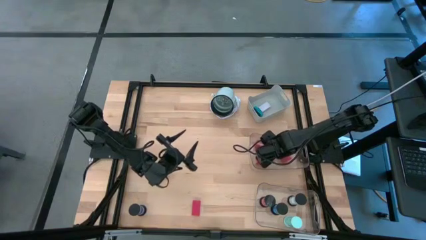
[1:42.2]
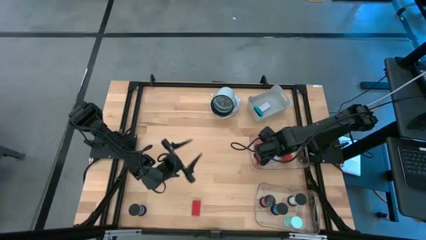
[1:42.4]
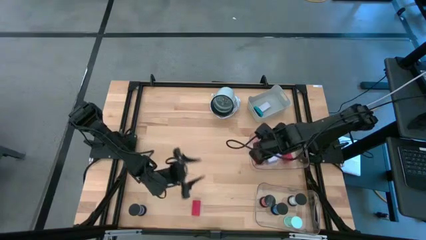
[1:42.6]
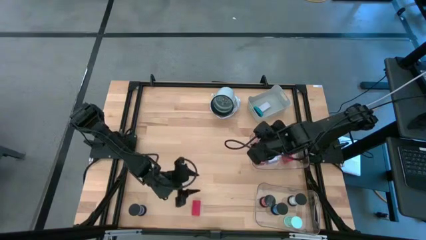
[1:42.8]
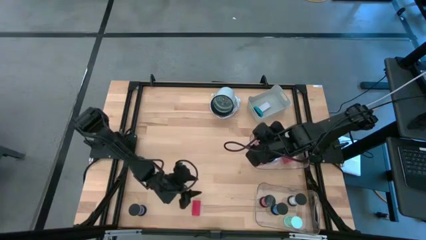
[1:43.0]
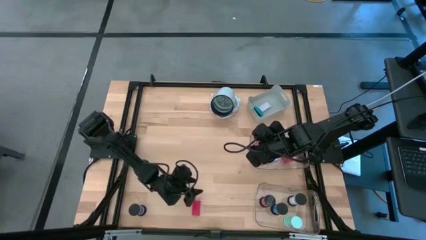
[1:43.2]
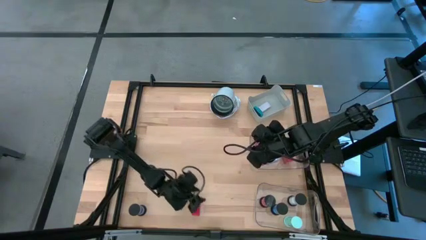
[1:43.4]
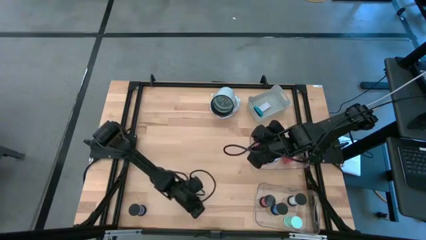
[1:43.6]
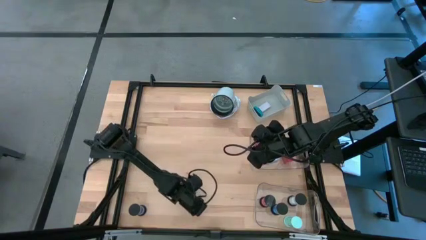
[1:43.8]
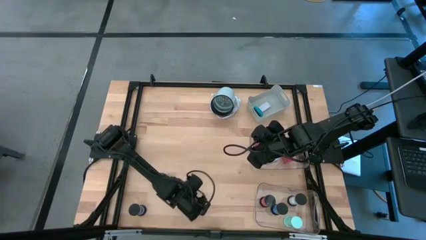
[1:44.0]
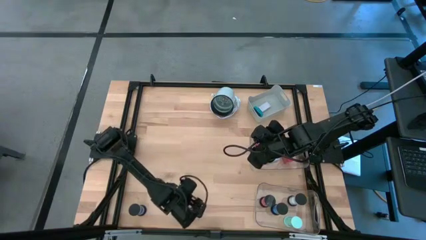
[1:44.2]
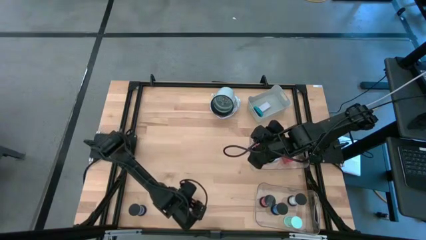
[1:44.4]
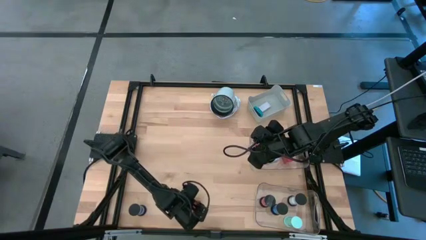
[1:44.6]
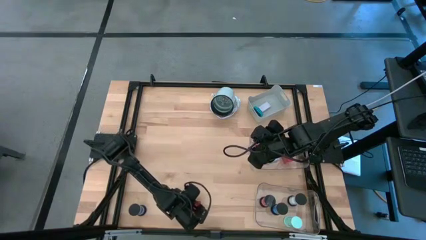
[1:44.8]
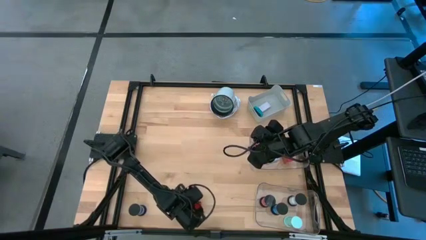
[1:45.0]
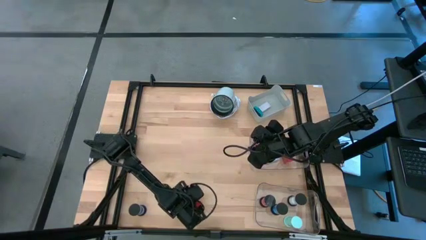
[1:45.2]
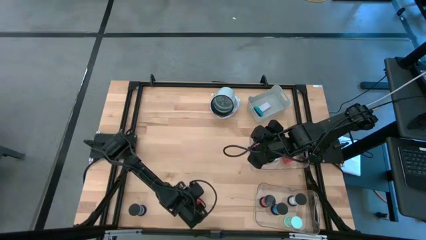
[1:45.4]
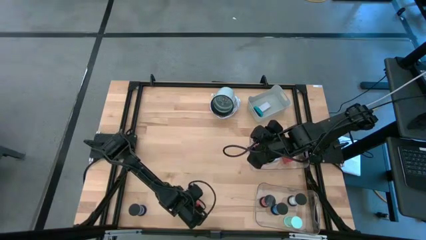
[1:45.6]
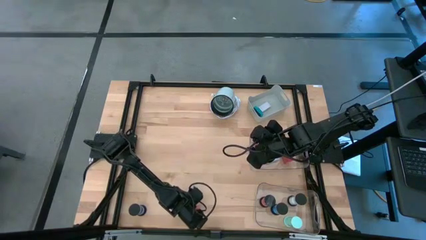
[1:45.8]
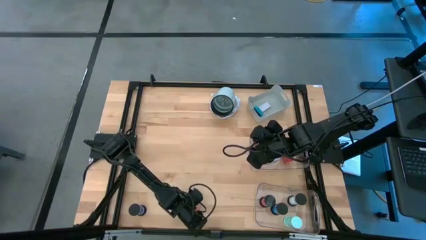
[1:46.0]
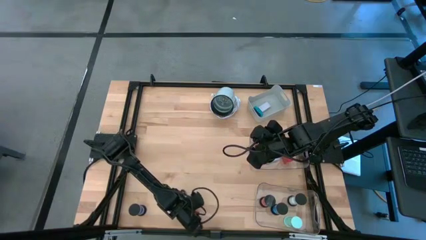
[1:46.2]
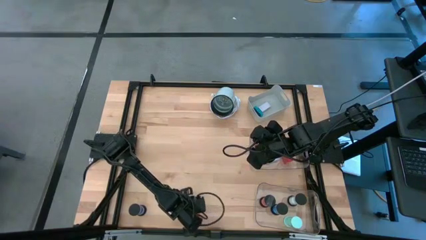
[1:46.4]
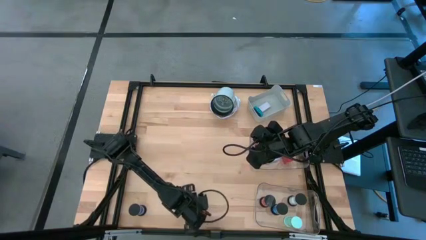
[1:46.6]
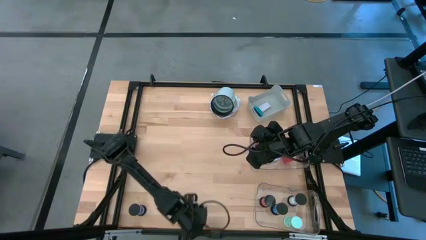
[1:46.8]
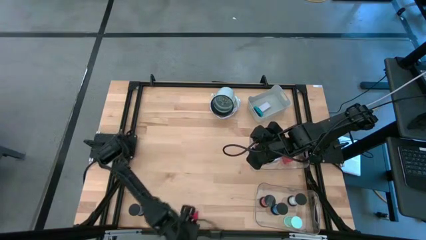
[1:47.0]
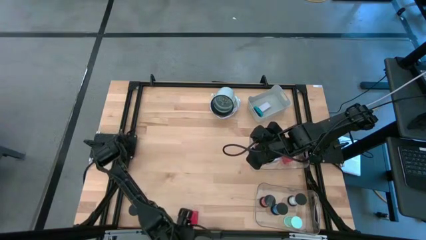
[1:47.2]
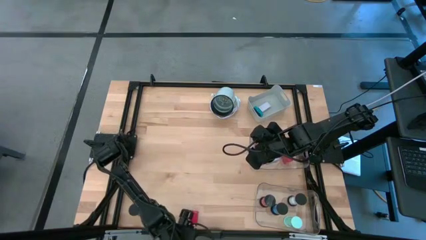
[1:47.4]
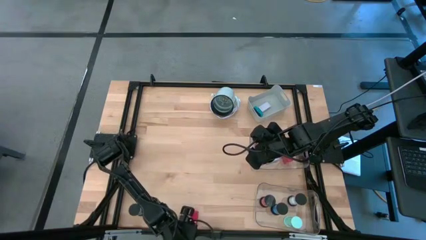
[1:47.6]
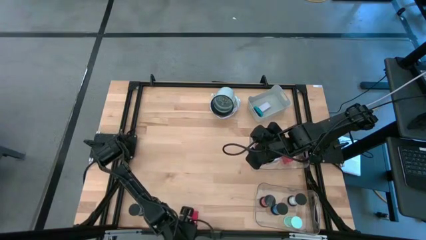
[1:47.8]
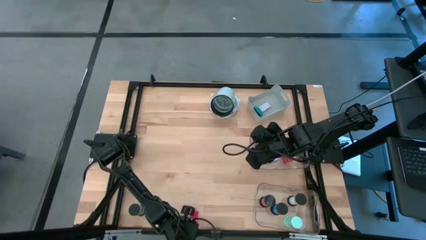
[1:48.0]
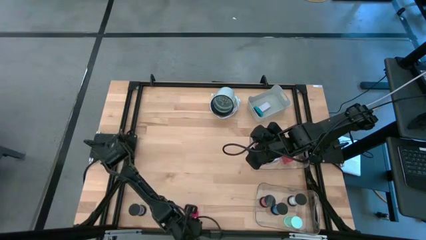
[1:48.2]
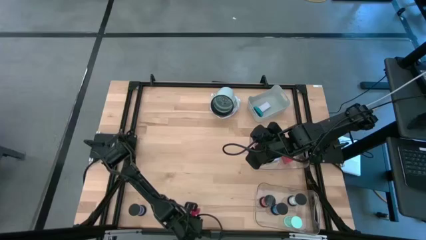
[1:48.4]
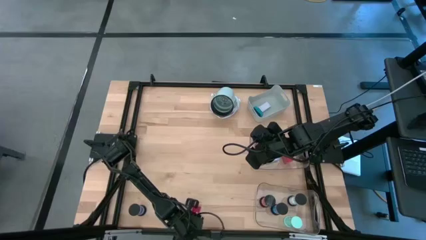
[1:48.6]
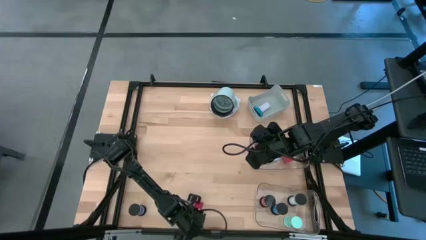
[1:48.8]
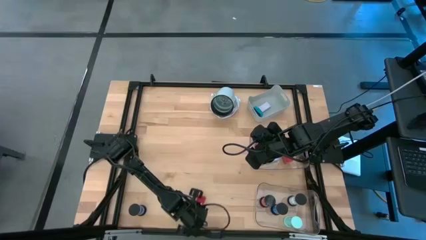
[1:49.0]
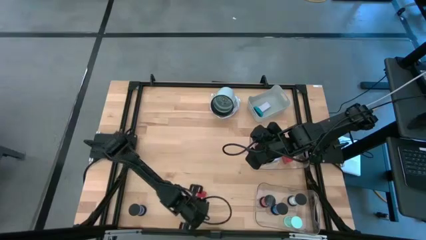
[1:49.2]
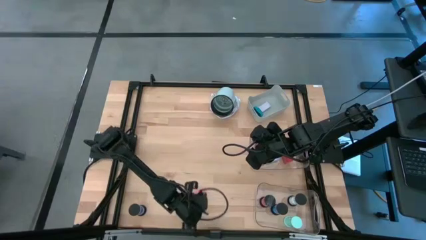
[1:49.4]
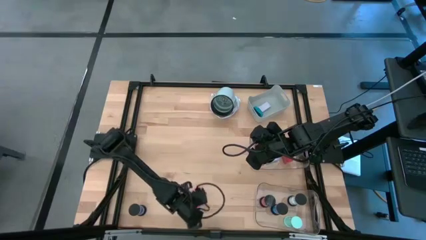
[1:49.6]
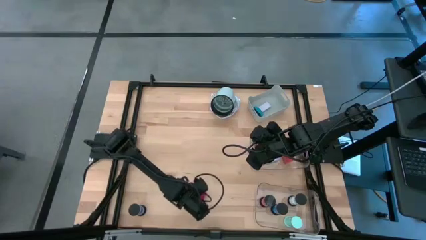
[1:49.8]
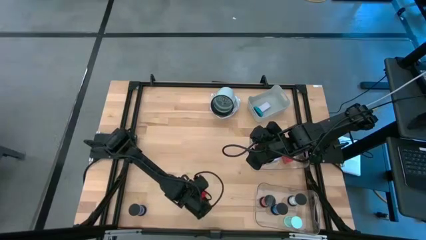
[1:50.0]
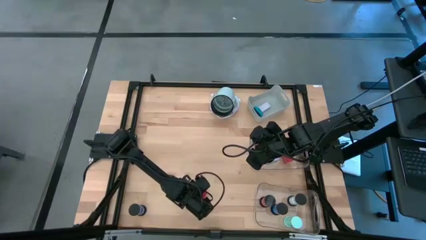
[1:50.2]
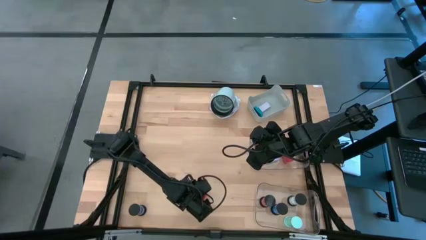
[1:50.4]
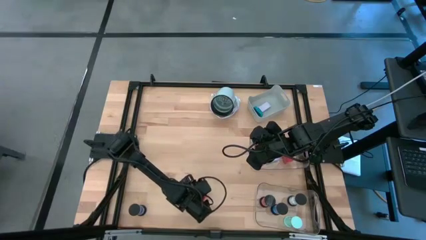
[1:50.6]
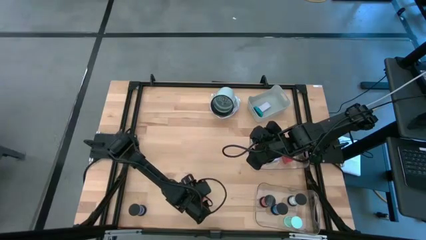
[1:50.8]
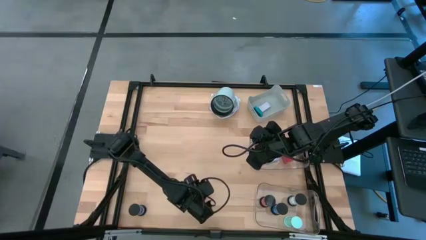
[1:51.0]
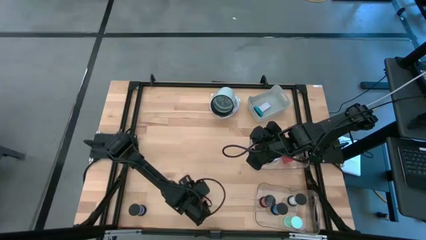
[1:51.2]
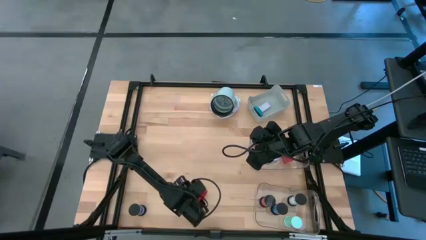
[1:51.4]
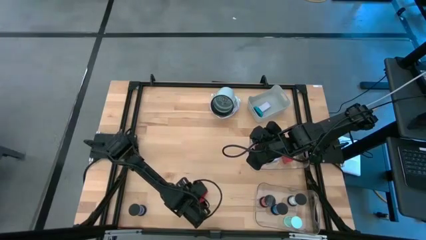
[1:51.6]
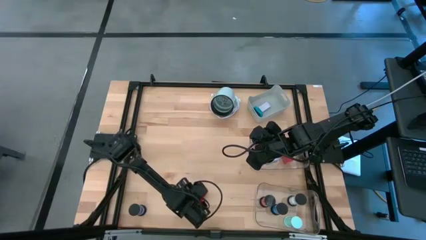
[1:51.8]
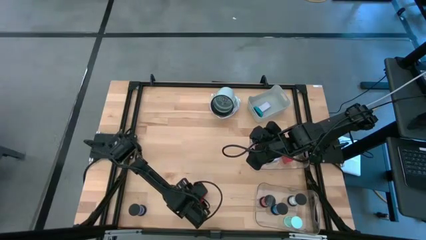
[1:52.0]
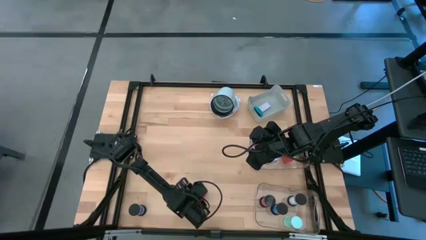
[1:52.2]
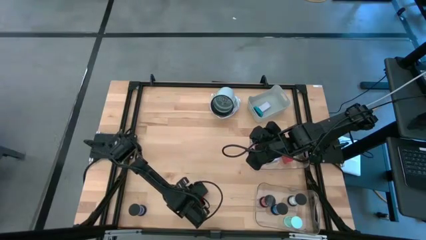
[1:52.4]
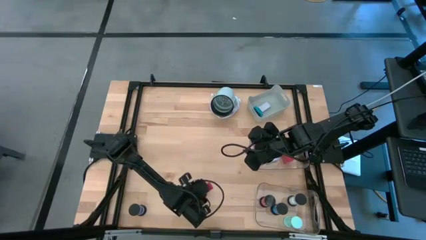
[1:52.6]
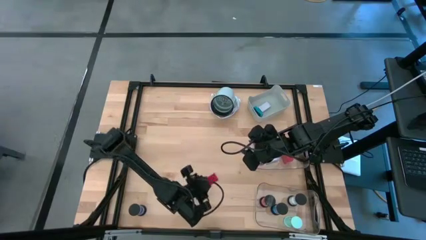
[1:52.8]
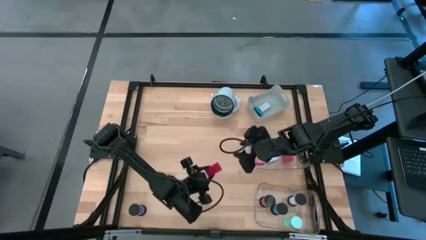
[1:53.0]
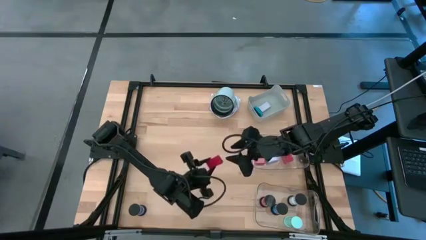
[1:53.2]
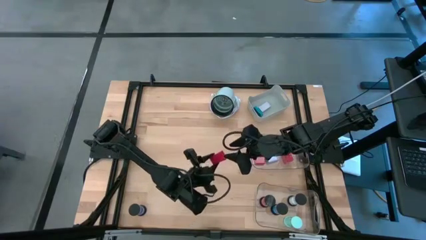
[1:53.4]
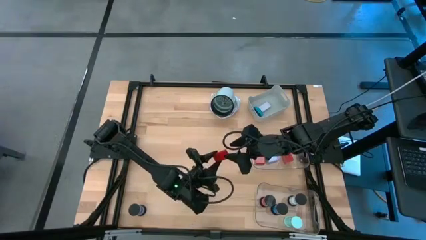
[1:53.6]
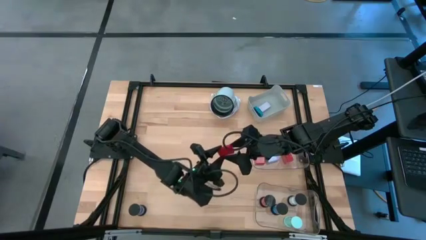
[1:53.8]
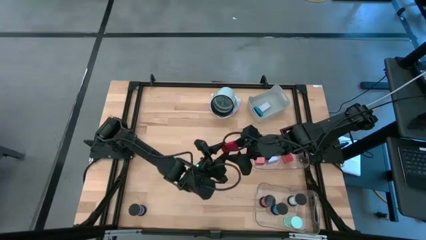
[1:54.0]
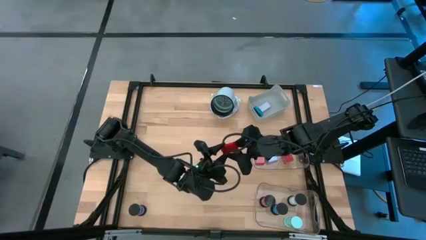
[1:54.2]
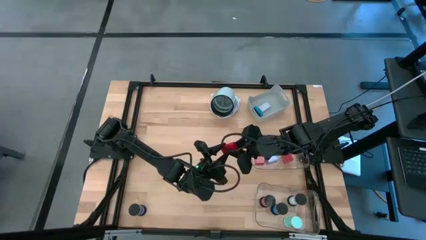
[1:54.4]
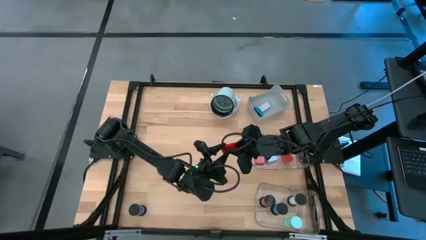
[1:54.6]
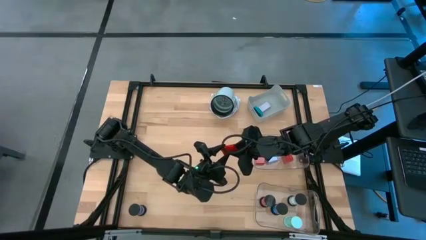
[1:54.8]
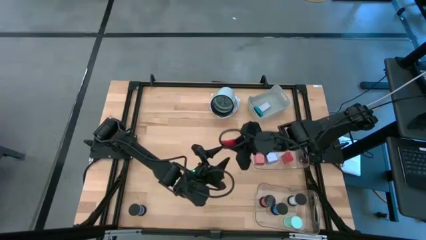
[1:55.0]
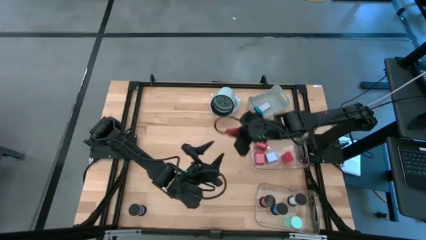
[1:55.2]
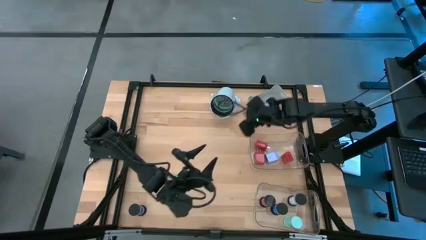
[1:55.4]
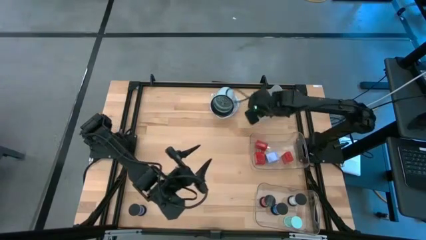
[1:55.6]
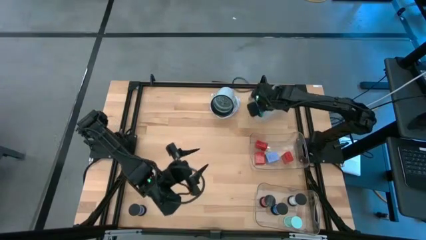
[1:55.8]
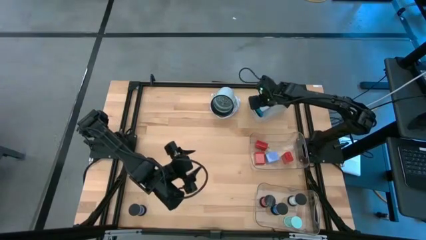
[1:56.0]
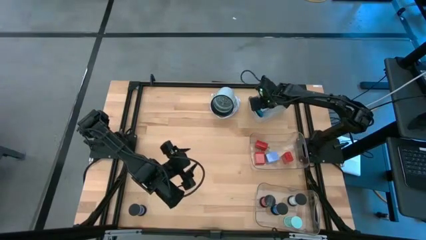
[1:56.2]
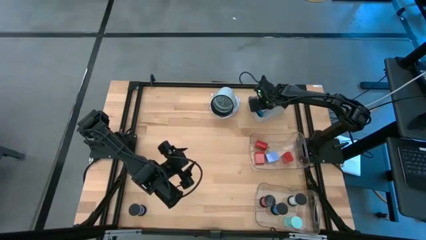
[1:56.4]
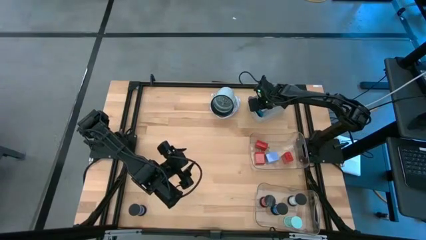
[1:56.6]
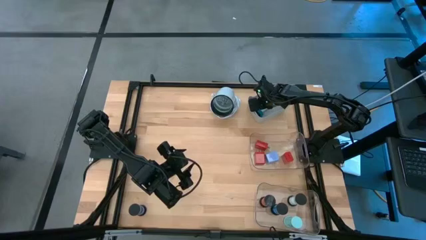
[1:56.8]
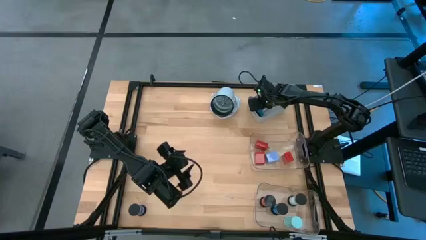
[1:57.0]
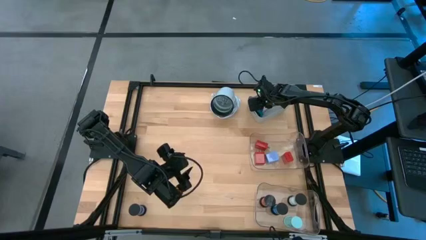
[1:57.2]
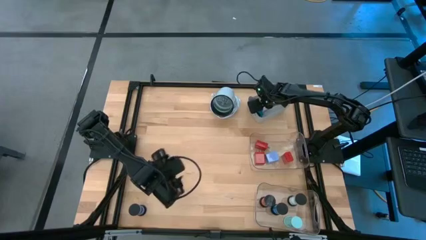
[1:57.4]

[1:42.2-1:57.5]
Task: Pick & Place Office items
Put the red digital clock into the gray bin
